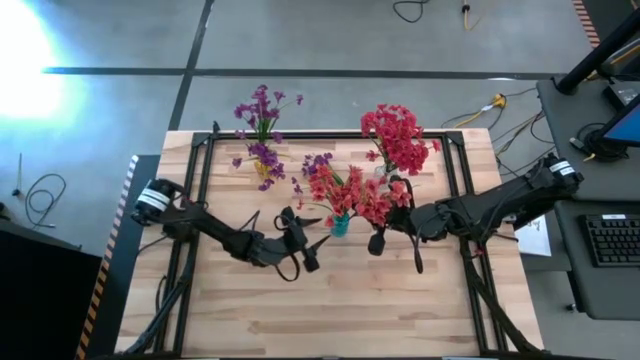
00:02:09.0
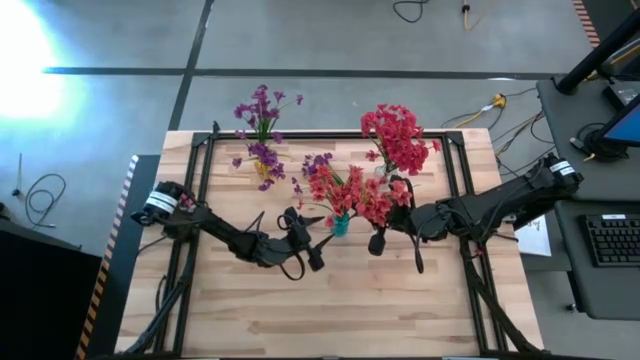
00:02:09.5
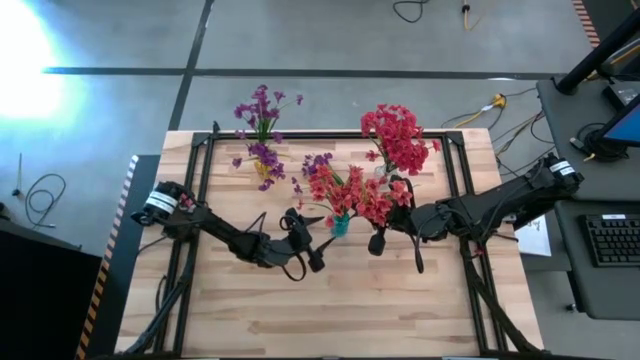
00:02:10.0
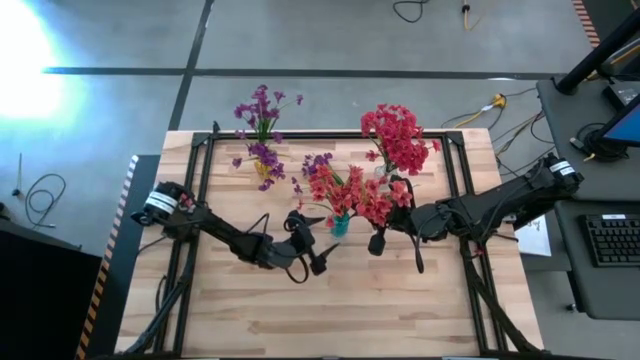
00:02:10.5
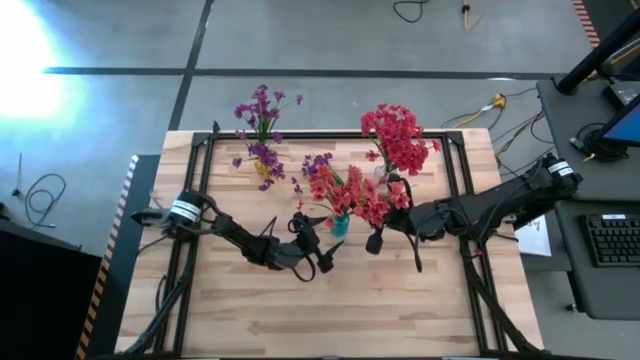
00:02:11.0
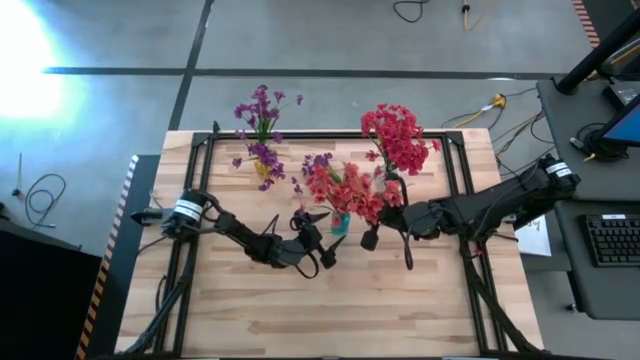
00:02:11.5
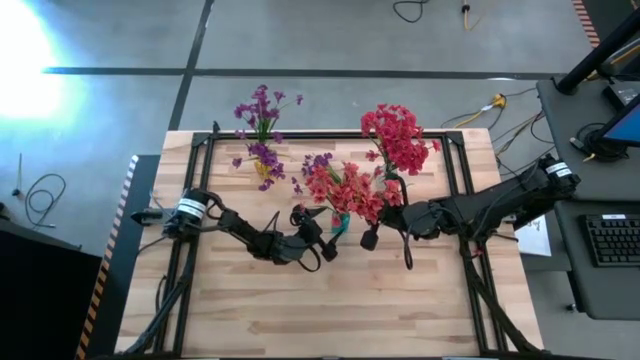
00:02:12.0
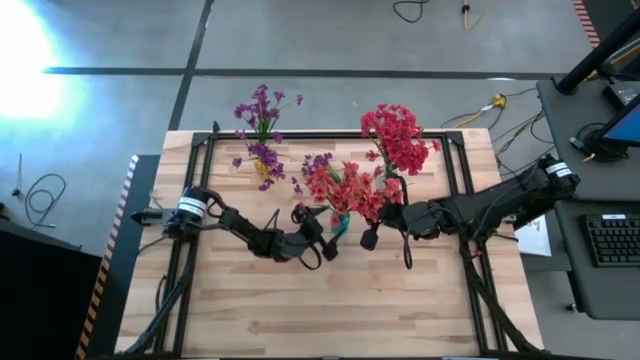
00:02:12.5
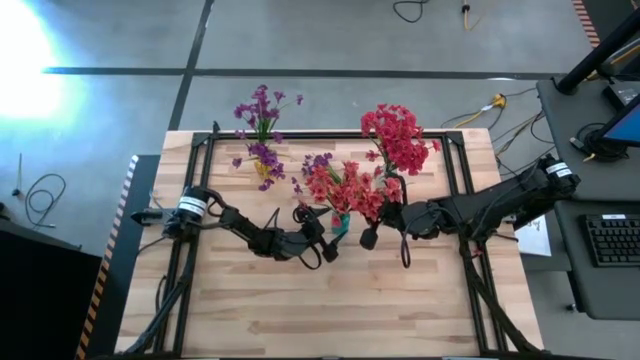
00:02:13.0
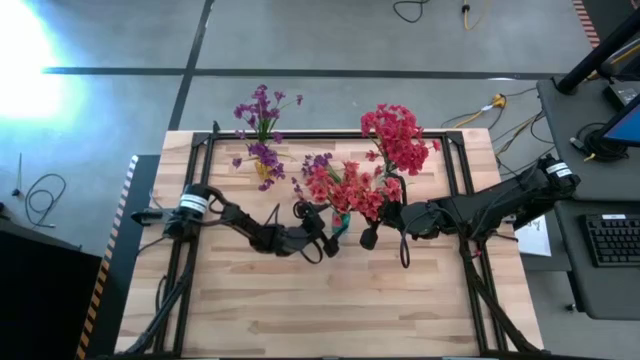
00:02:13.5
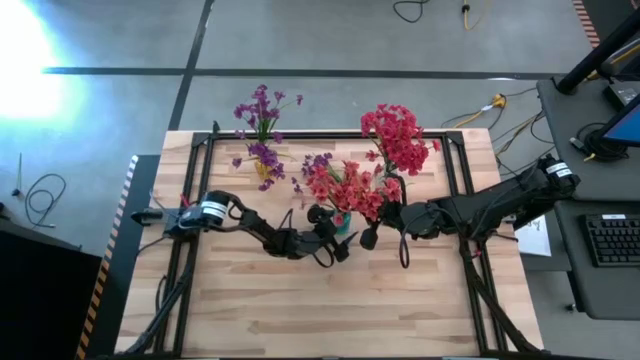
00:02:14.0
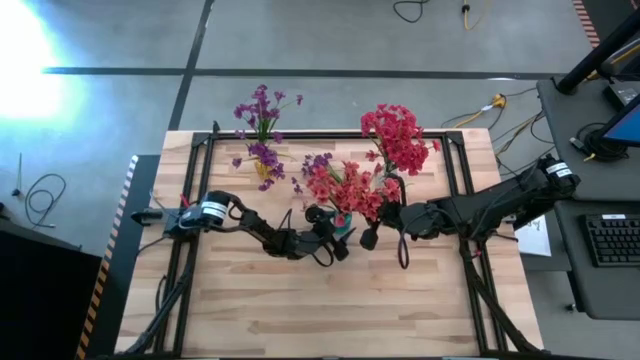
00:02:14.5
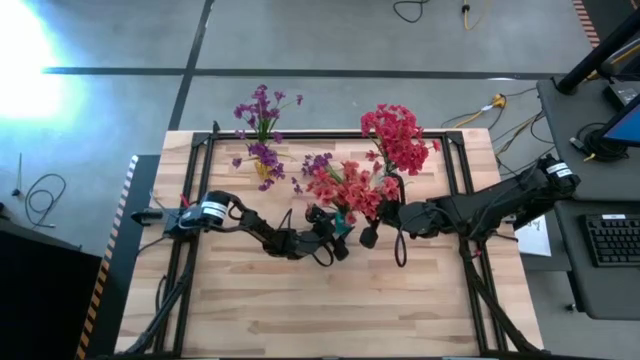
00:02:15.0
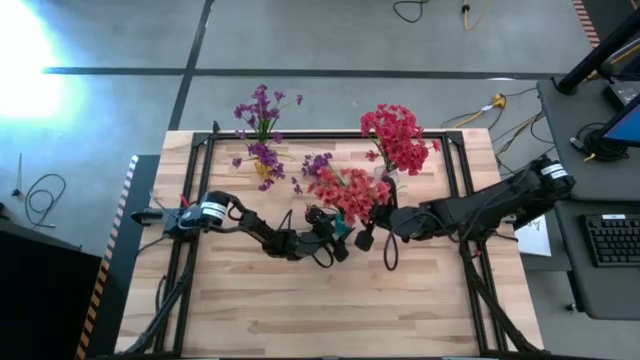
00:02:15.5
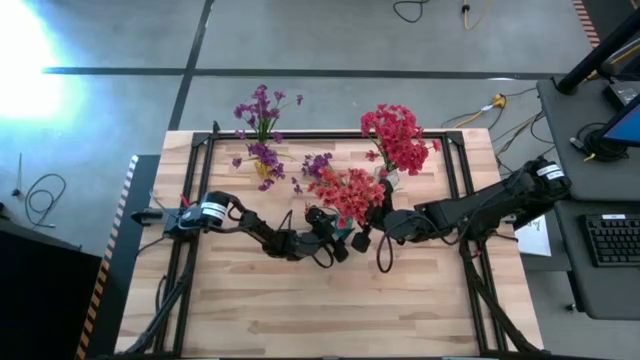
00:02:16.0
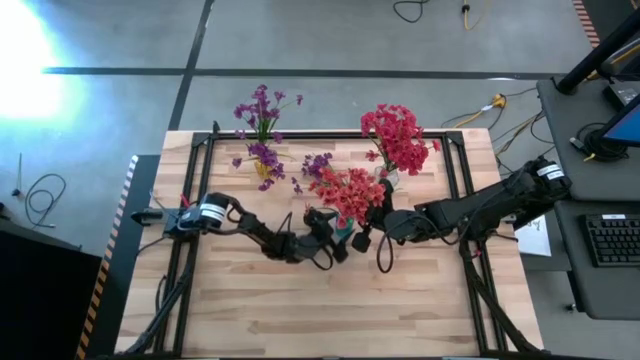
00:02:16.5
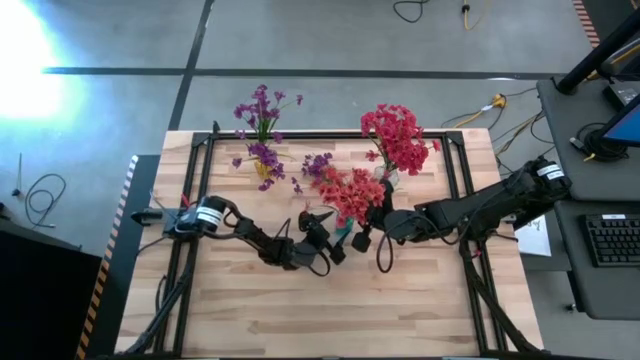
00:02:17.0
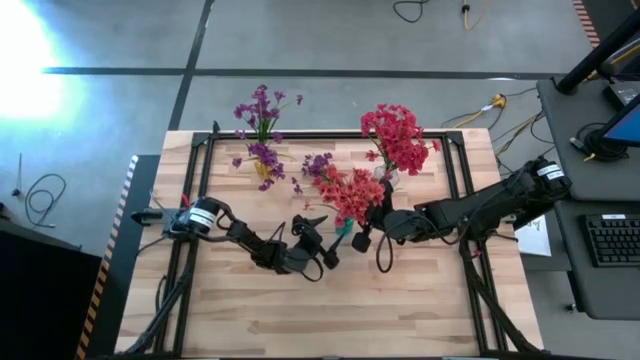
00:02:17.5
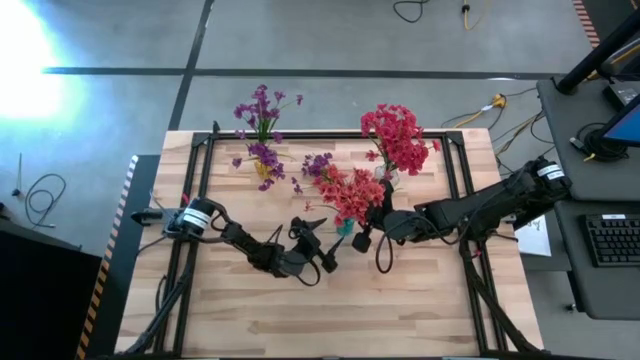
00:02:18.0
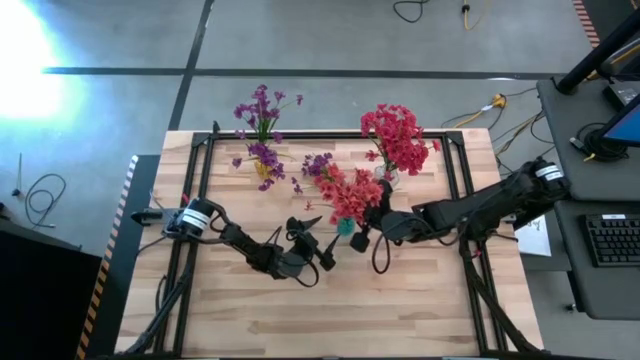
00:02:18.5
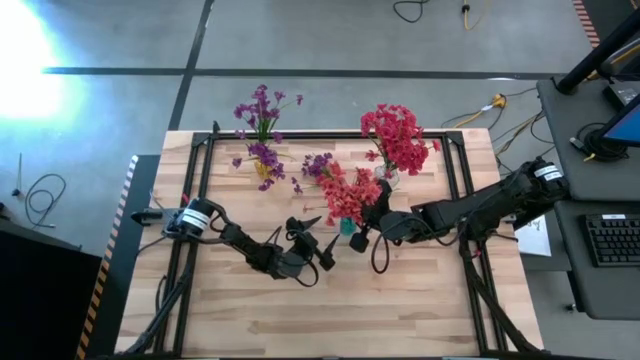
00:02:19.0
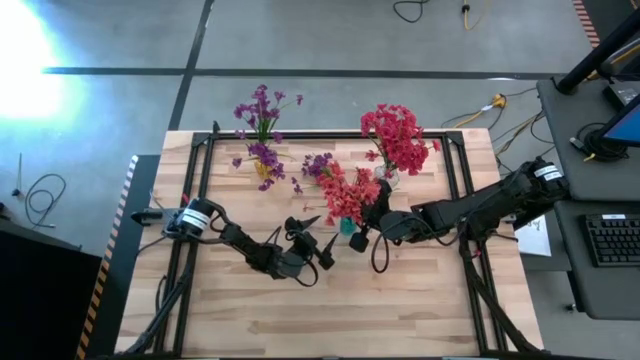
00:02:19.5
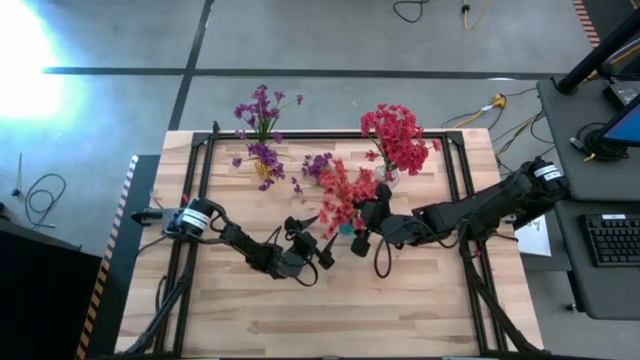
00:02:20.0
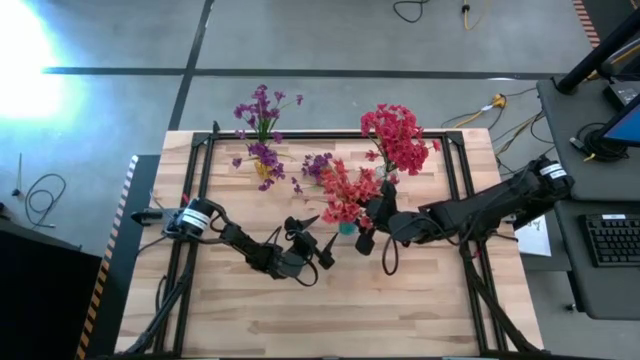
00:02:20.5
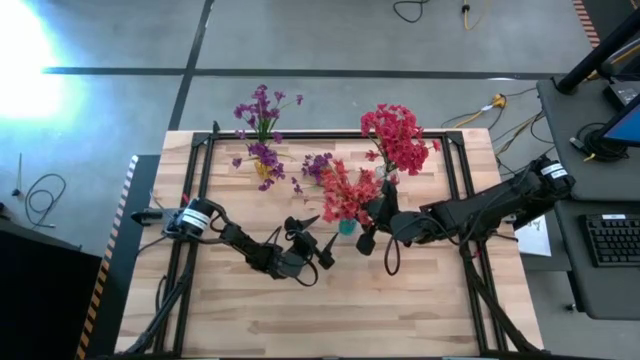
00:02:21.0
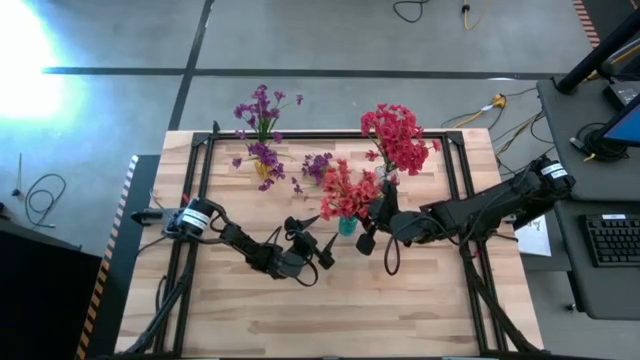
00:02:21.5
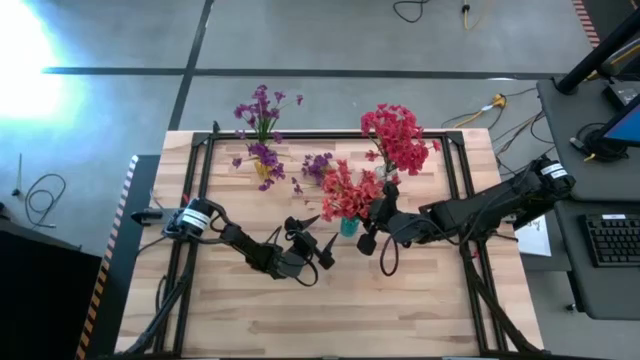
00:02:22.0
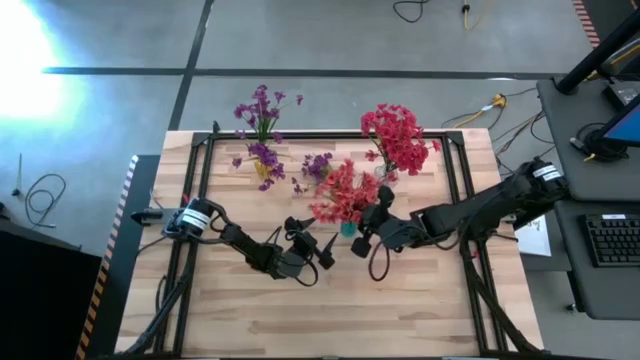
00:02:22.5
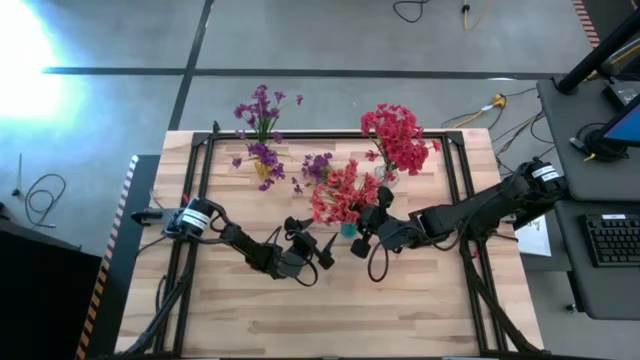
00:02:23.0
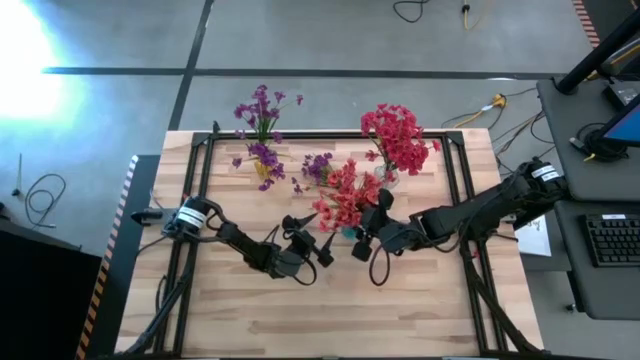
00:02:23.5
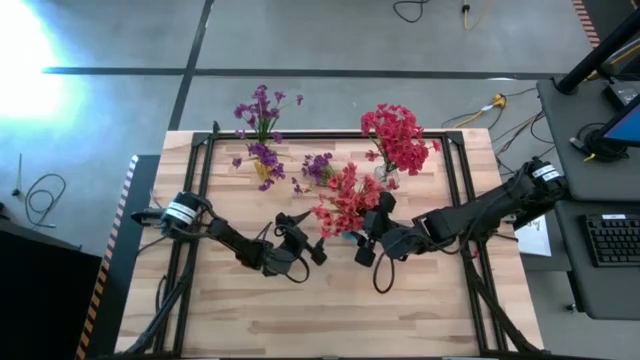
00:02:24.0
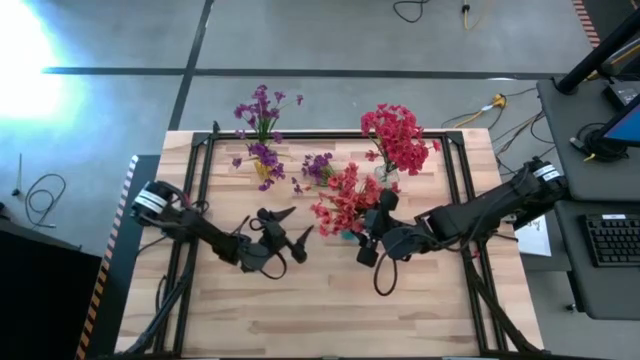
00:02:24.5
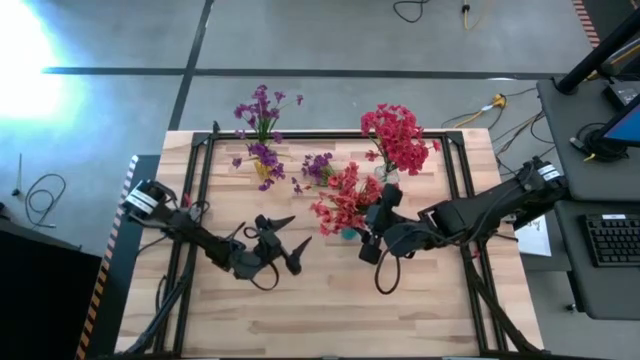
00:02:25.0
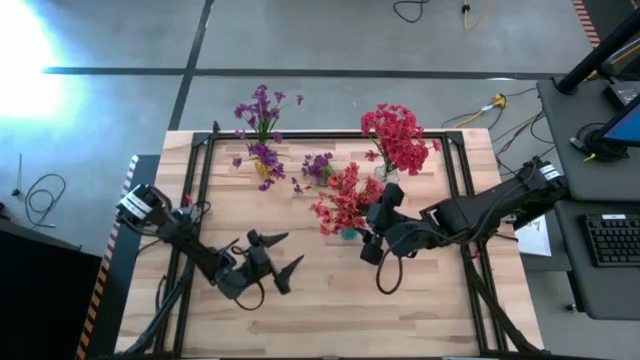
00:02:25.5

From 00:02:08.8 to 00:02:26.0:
Task: Sort flowers into vase by color
Put the orange flowers into the blue vase

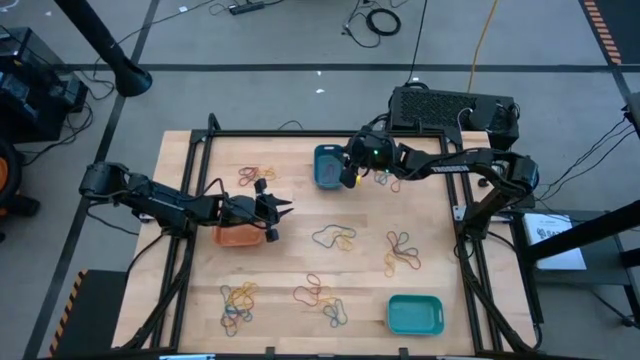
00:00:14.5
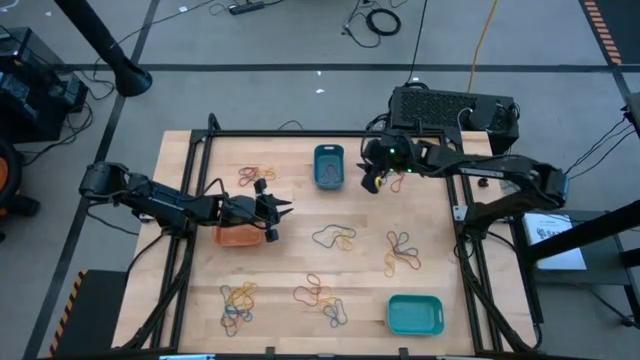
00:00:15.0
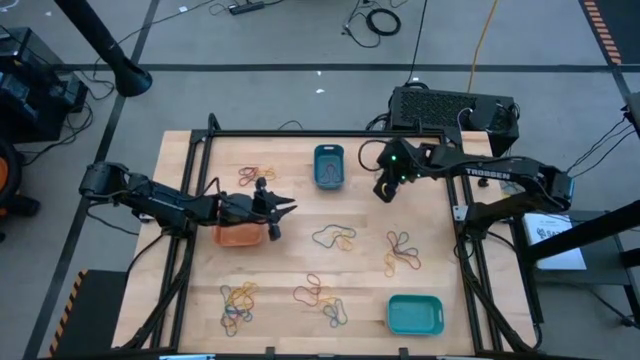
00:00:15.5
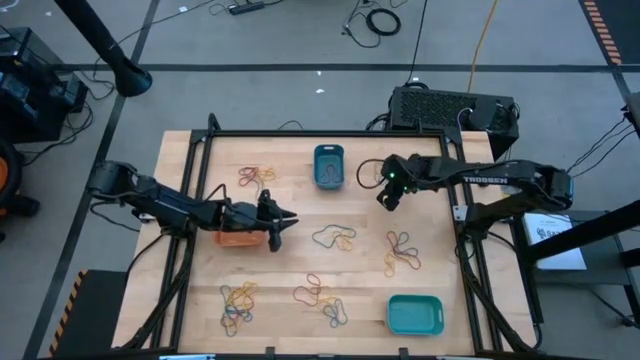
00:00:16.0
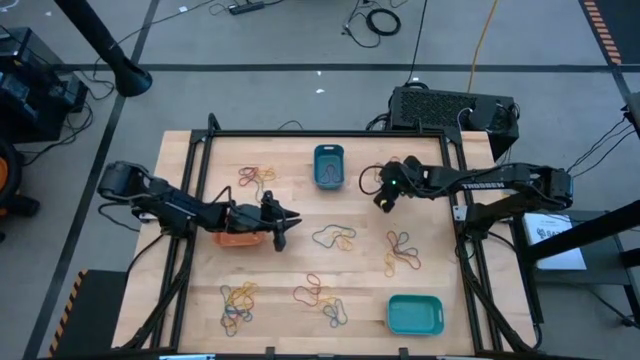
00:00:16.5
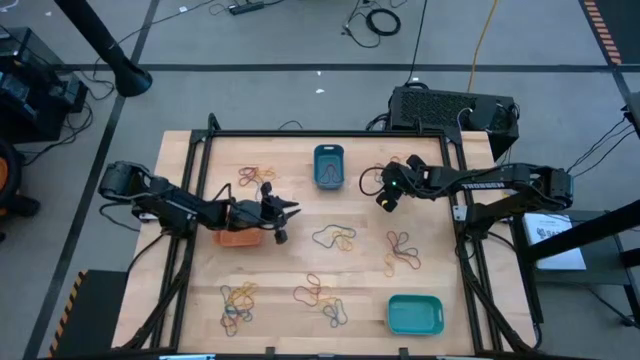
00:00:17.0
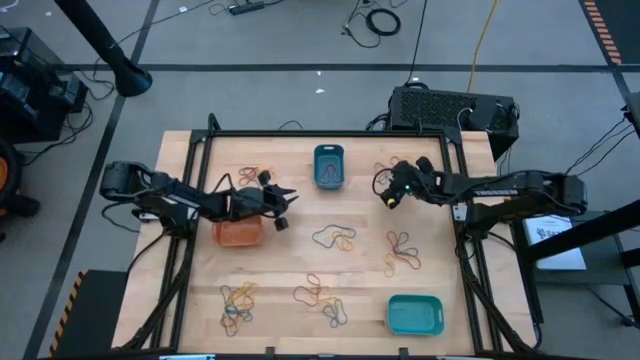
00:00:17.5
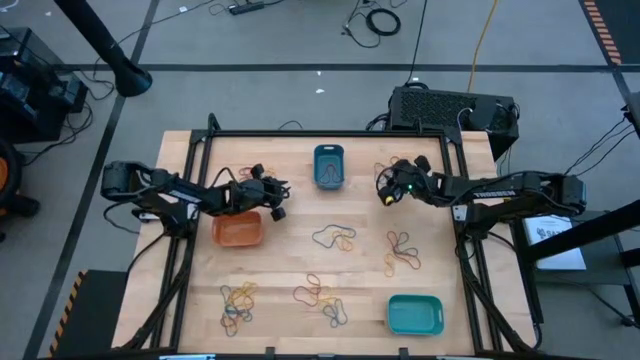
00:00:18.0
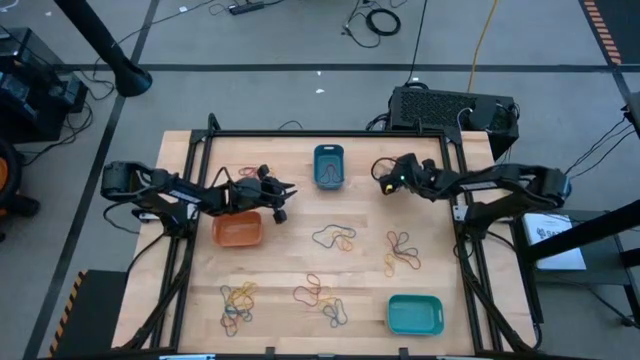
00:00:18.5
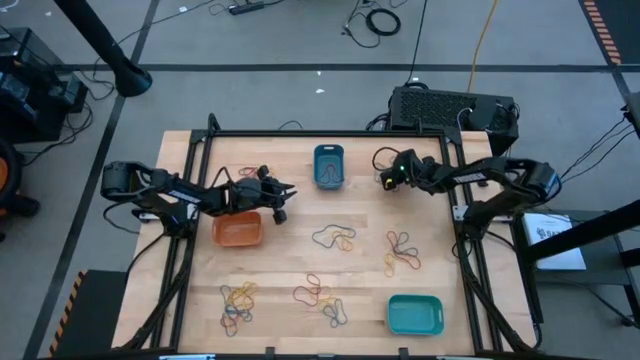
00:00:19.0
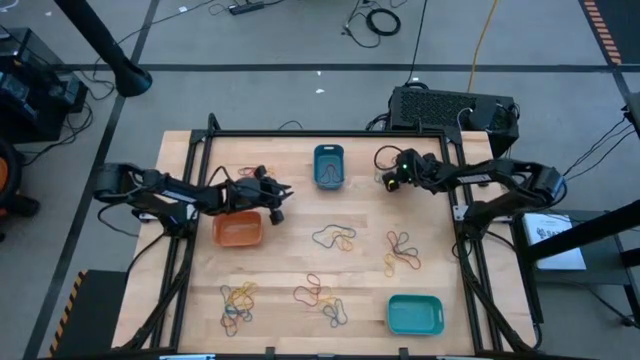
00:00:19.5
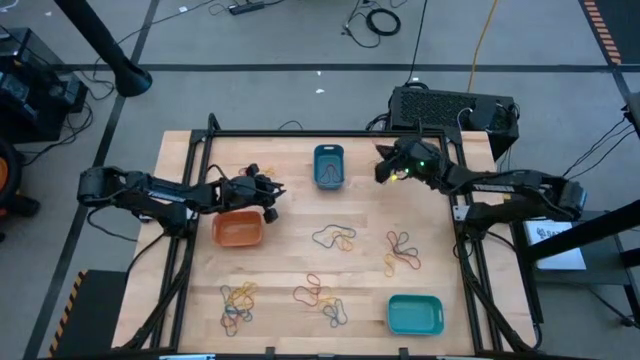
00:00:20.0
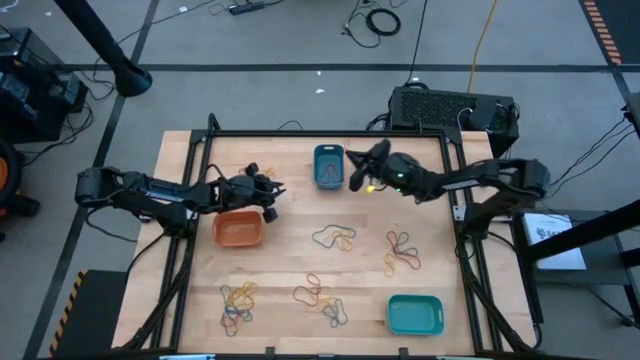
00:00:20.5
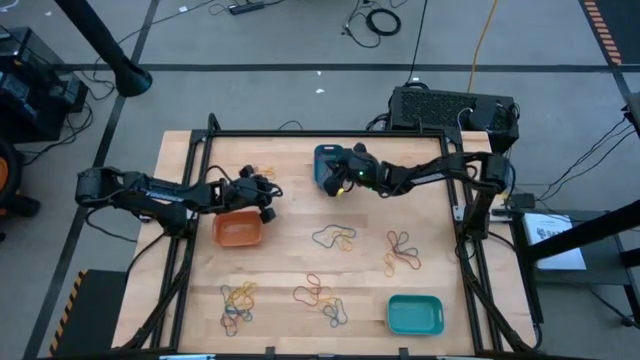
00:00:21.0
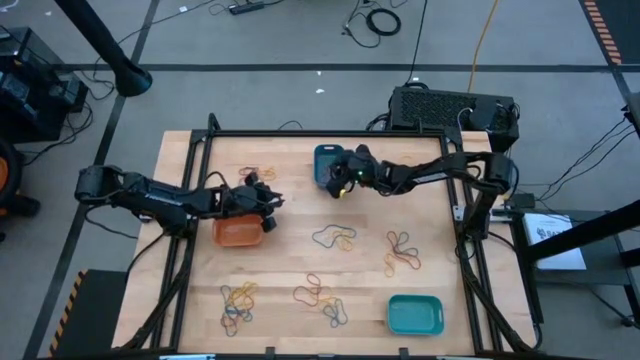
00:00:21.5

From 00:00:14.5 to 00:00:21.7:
Task: Sort rubber bands into baskets
Put the top right red rubber band into the blue bin
